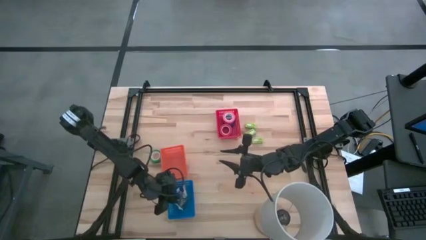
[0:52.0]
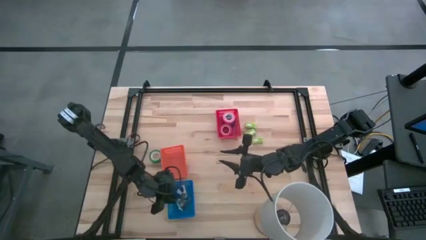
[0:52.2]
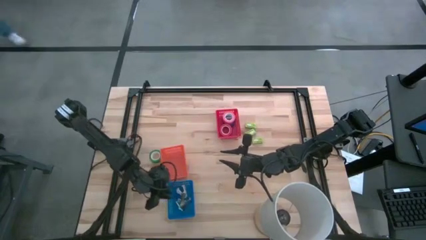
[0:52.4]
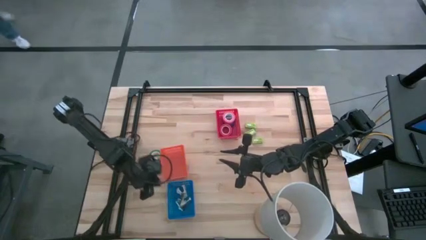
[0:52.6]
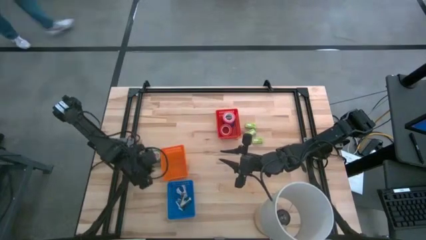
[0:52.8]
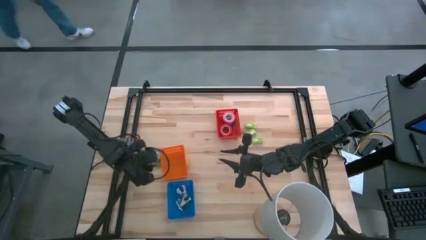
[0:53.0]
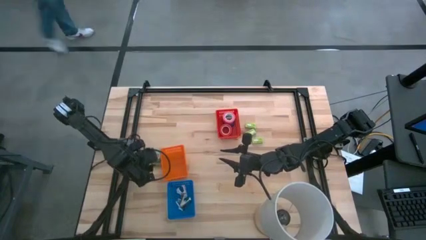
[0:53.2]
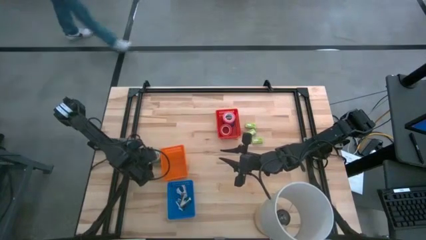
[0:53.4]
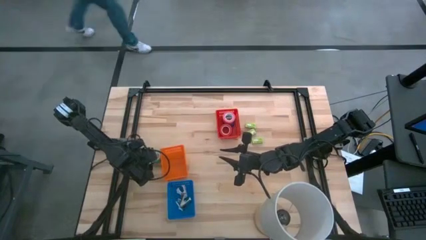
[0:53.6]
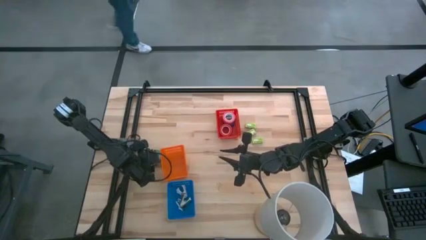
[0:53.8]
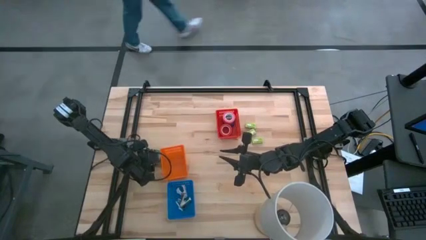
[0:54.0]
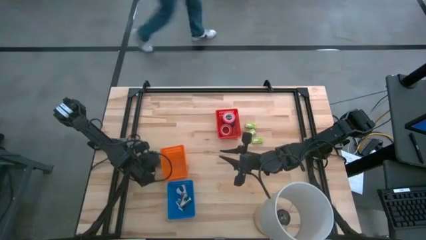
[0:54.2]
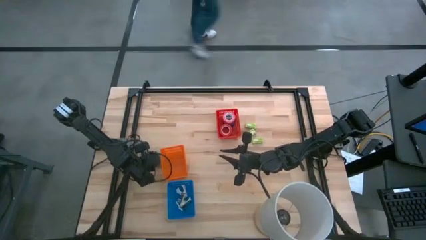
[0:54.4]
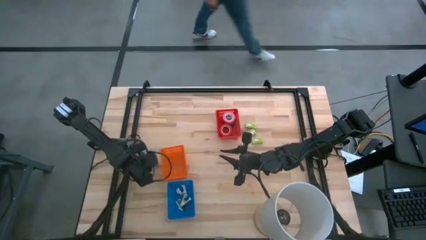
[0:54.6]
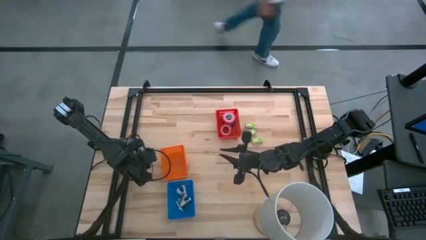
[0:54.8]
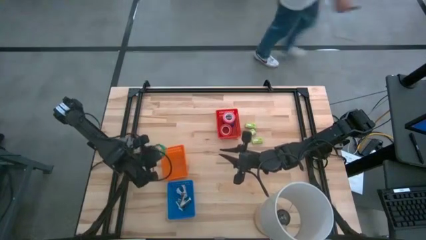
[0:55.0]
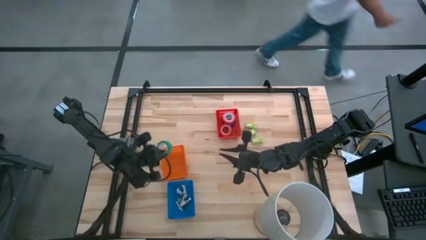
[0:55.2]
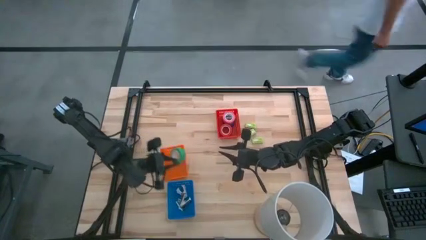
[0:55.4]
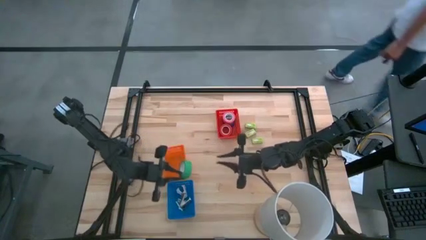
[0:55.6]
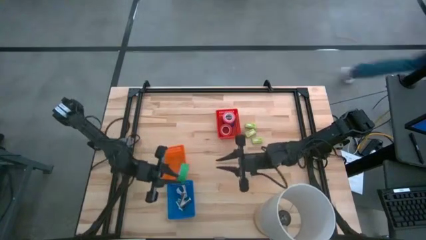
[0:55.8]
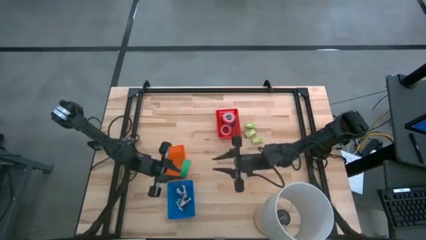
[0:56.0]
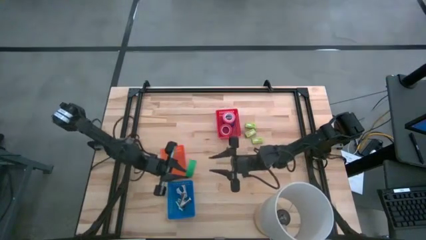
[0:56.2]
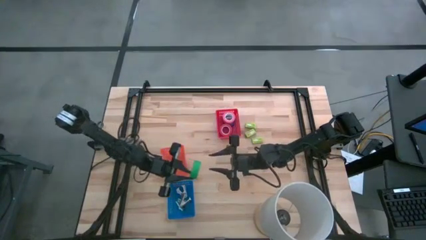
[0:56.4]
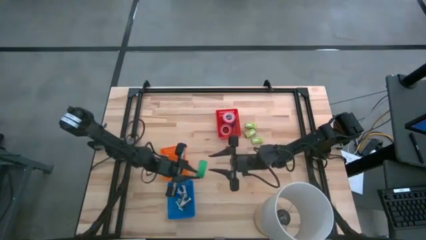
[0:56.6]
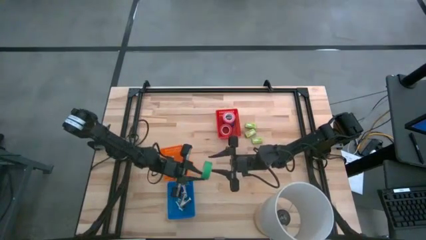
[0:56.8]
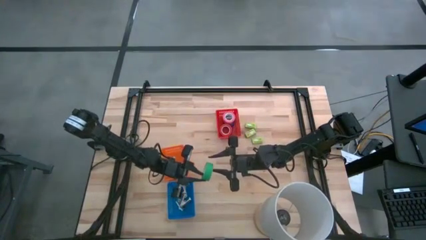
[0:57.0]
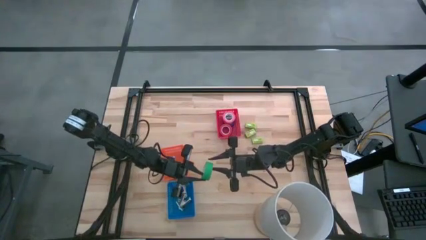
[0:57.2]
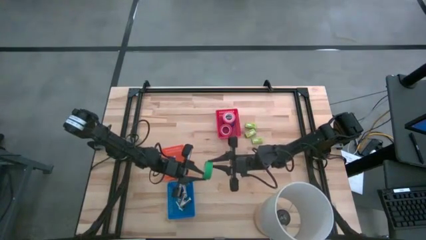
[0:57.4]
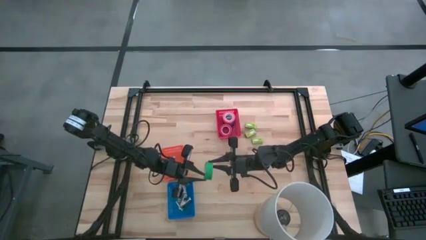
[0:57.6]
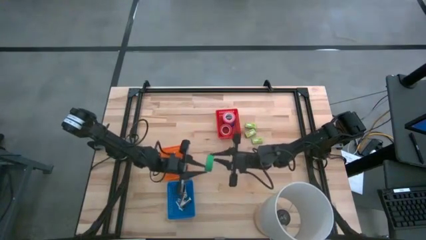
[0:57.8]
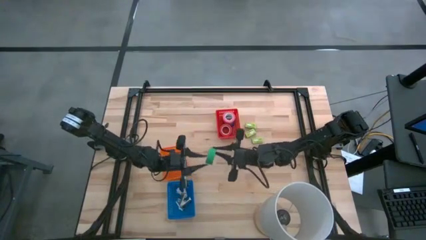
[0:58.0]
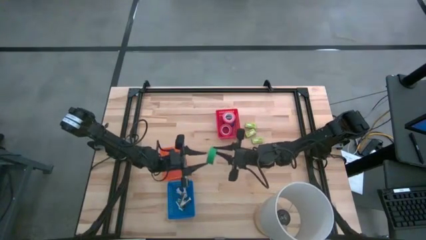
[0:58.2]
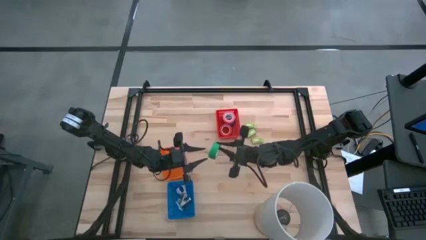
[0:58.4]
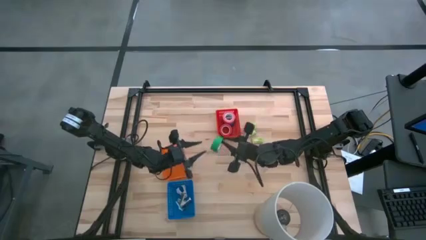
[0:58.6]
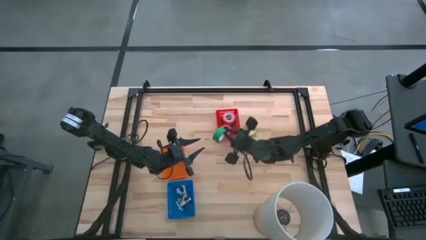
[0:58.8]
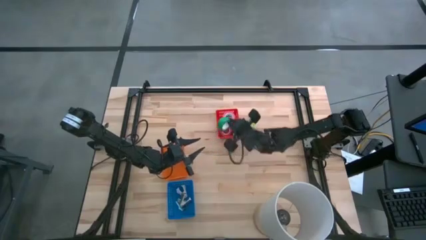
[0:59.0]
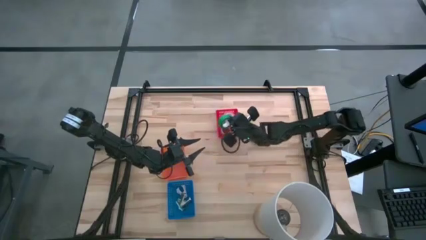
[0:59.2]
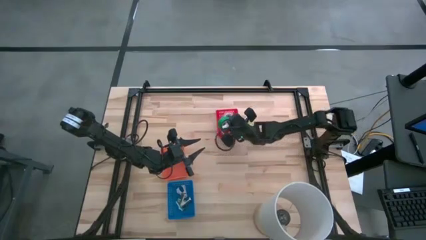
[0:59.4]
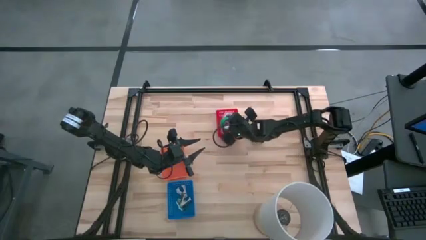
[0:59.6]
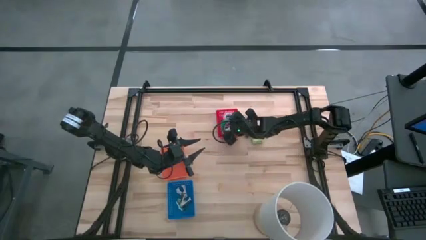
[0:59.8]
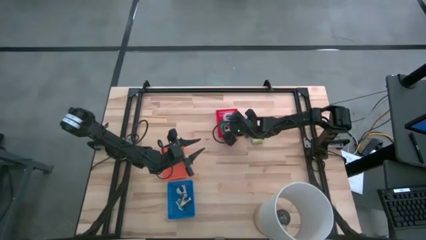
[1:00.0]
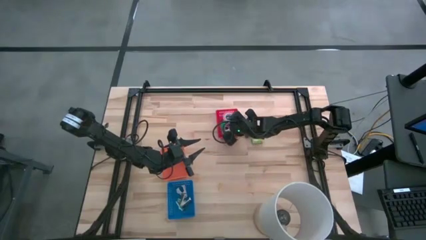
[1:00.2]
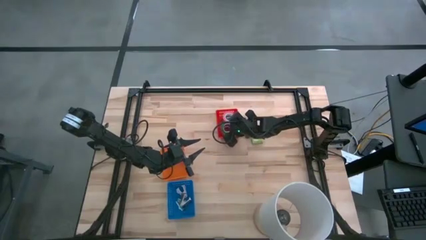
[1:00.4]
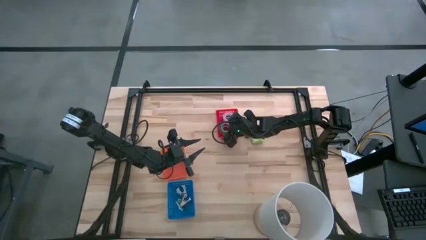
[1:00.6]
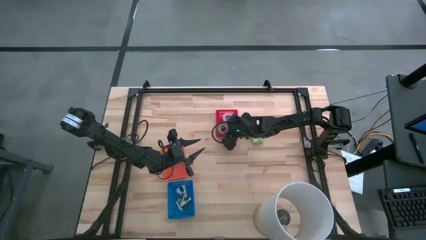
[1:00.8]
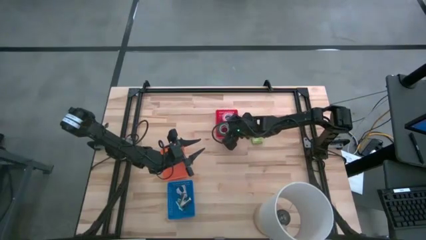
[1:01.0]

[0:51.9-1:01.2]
Task: Pick and place Stapler, Stapler remover, tape
Put the green tape into the red bin

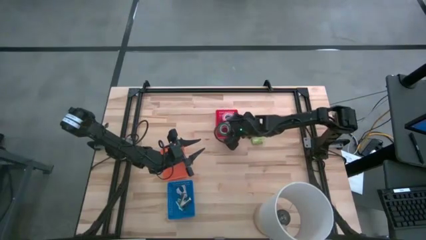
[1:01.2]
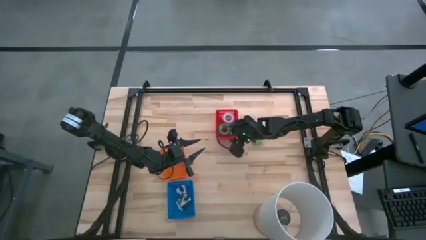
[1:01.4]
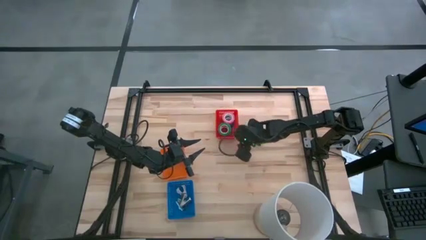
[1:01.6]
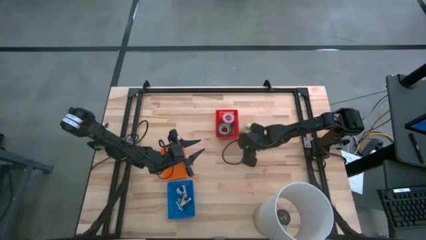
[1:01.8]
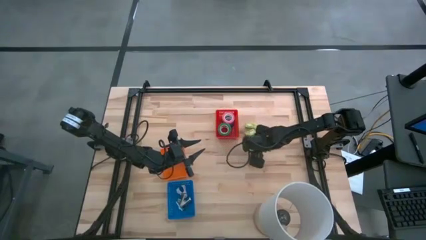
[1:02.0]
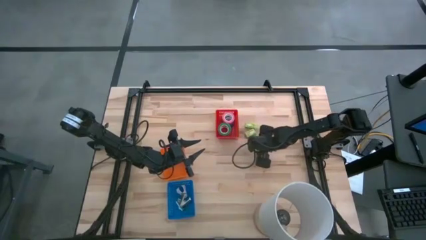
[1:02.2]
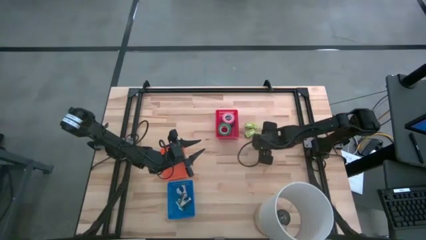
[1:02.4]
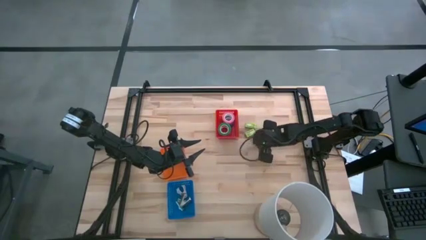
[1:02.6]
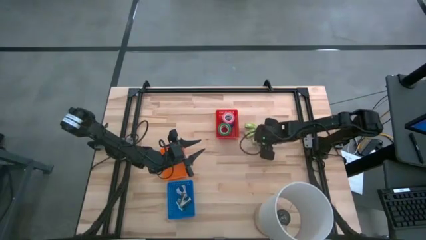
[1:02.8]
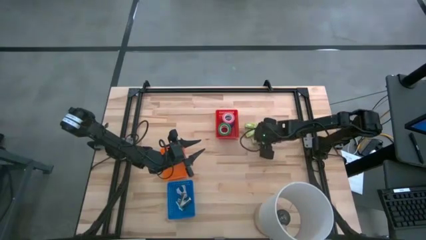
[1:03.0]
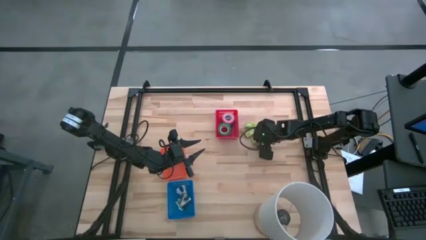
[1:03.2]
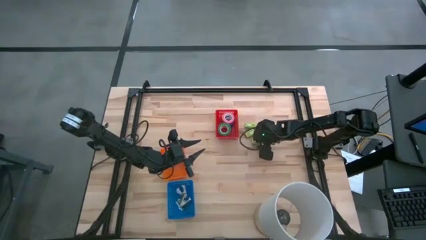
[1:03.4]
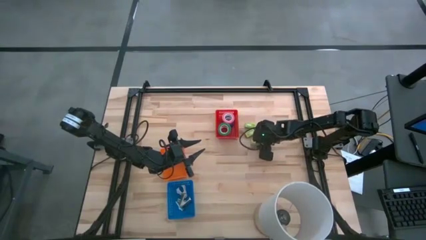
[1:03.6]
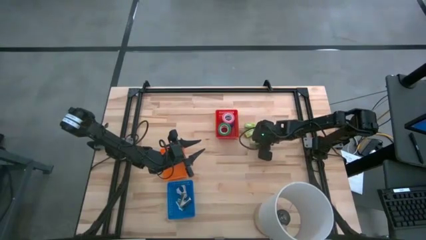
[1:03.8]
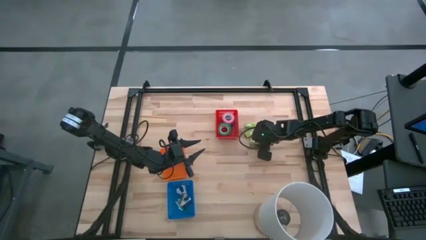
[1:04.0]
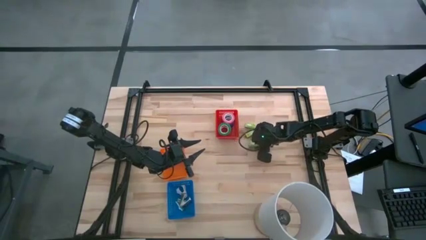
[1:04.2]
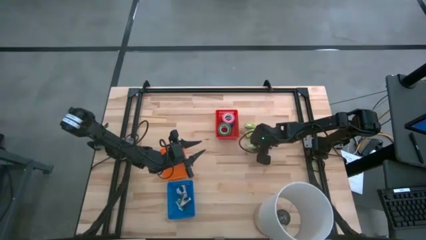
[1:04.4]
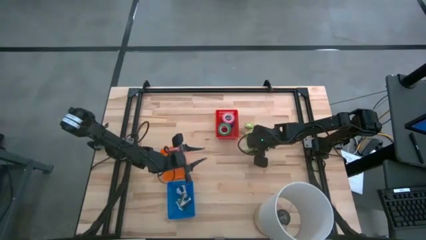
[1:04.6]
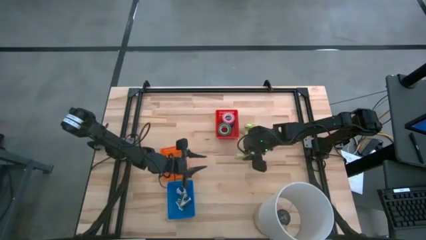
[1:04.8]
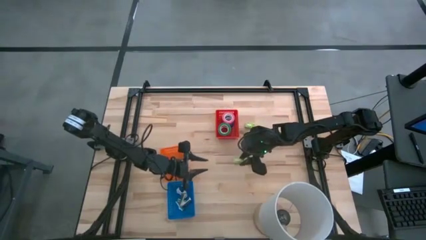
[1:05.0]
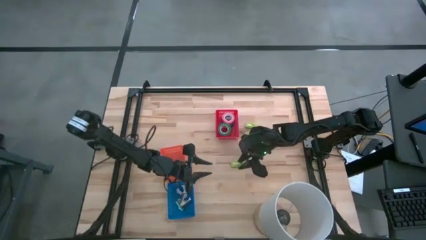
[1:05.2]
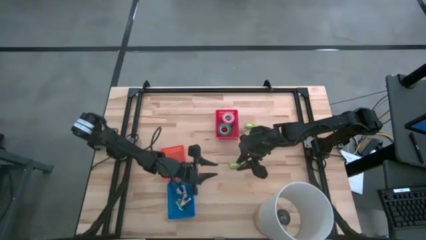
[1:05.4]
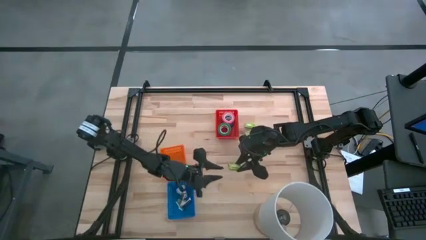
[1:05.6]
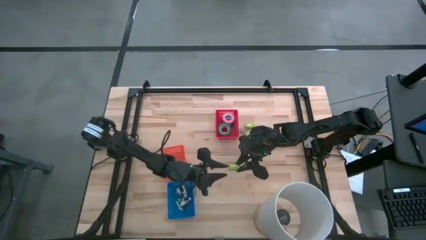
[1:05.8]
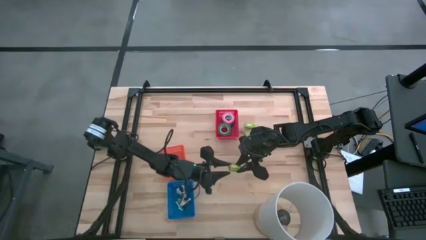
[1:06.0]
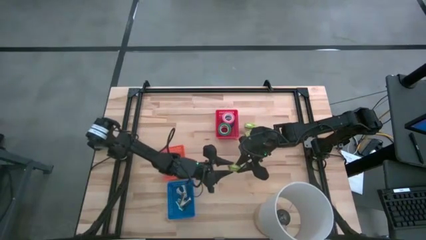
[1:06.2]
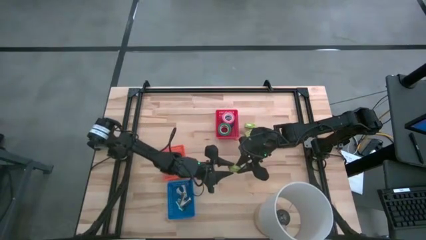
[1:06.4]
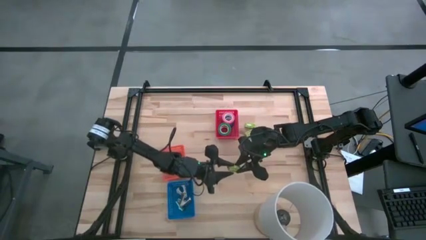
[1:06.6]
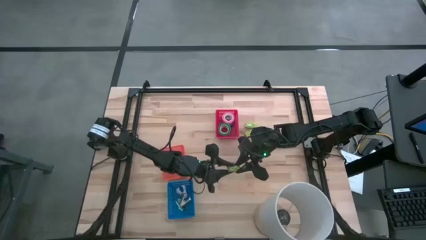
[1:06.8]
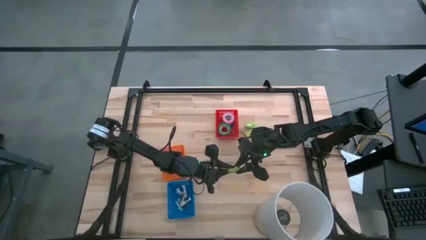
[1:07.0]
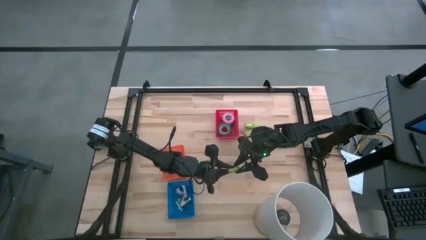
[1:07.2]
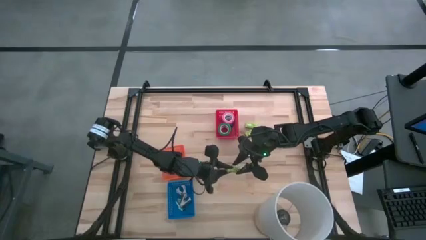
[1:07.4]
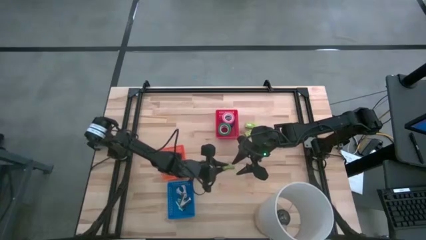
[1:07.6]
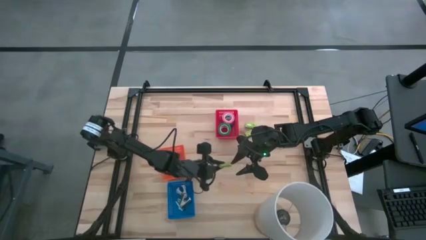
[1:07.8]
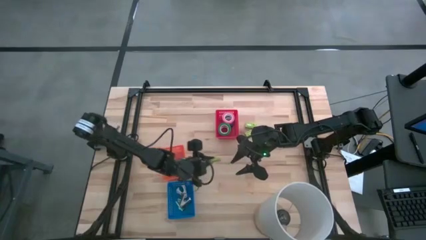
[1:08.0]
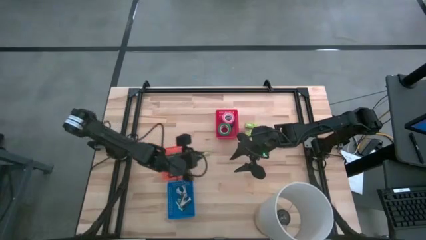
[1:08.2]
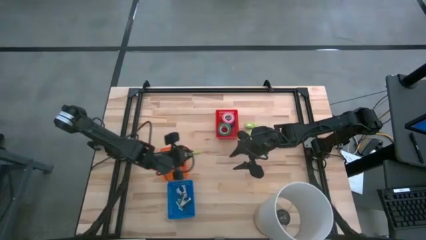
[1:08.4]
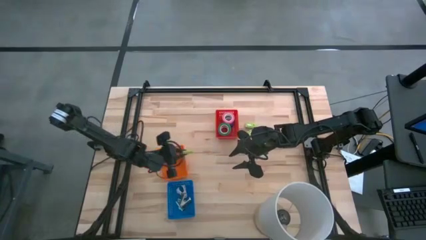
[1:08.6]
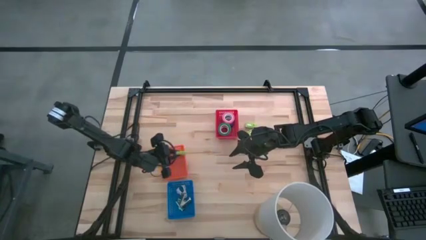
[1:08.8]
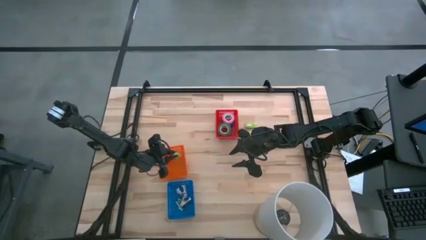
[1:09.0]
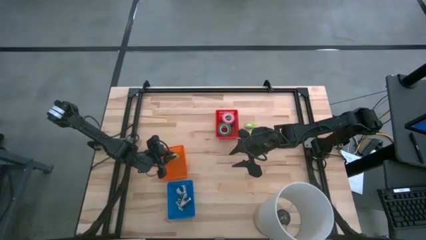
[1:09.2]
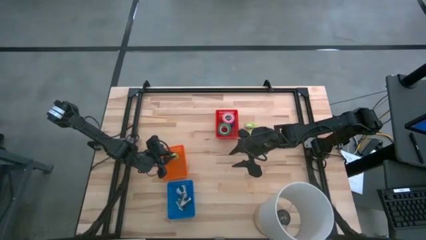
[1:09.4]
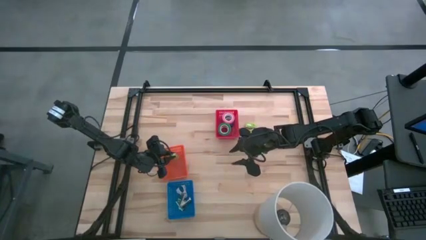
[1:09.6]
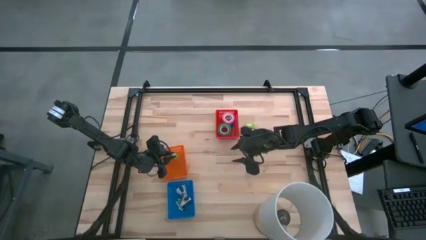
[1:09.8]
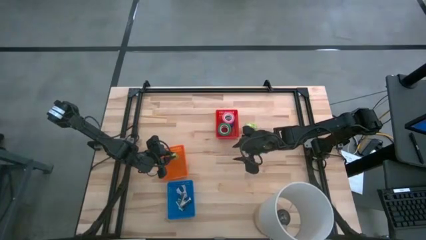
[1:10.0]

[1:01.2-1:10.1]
Put the bottom green staple box into the orange bin
